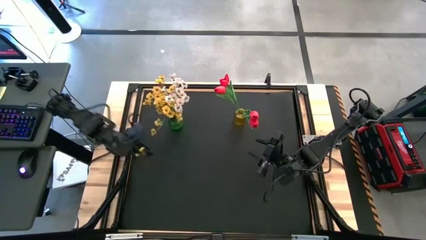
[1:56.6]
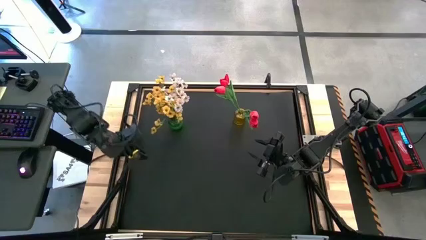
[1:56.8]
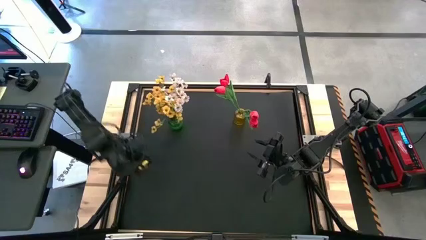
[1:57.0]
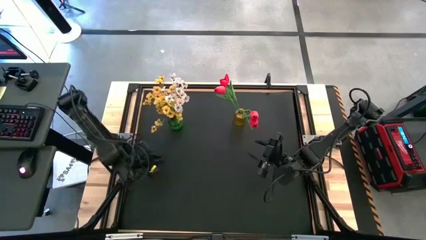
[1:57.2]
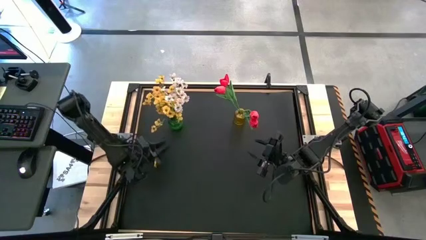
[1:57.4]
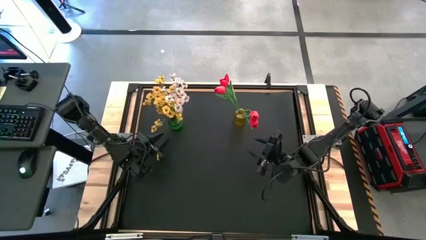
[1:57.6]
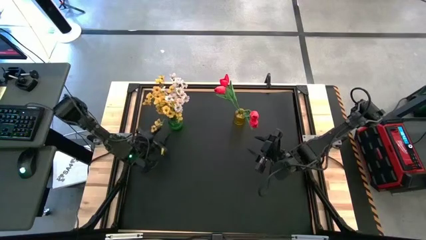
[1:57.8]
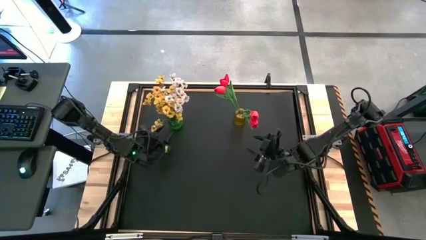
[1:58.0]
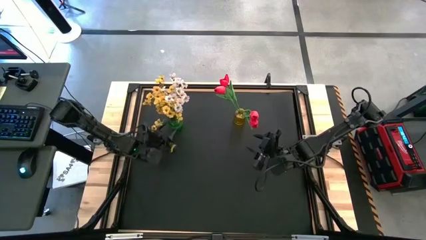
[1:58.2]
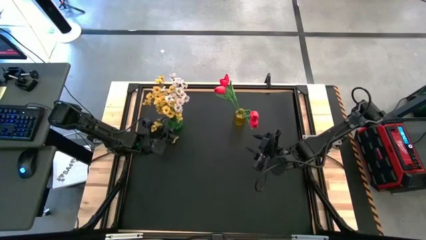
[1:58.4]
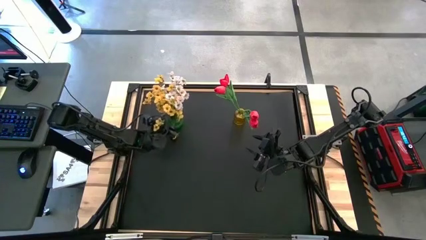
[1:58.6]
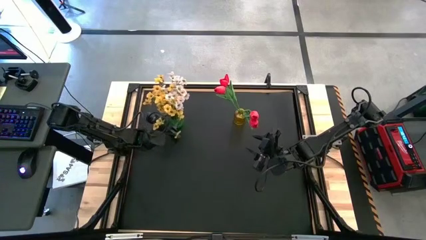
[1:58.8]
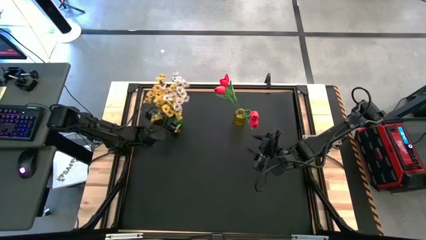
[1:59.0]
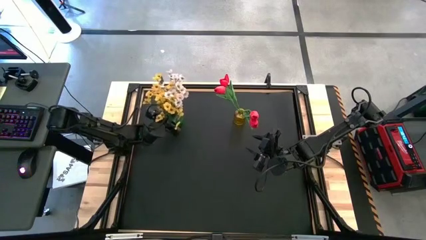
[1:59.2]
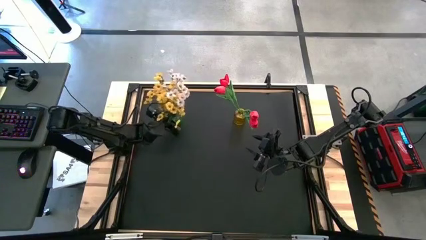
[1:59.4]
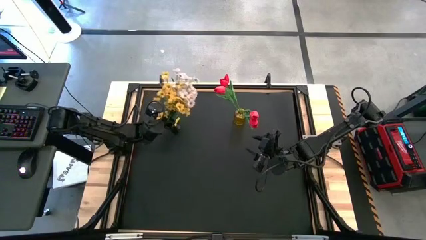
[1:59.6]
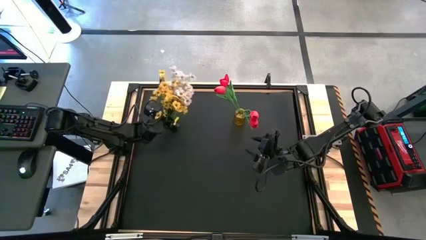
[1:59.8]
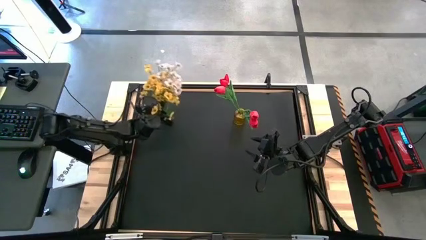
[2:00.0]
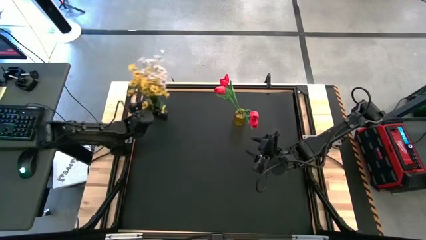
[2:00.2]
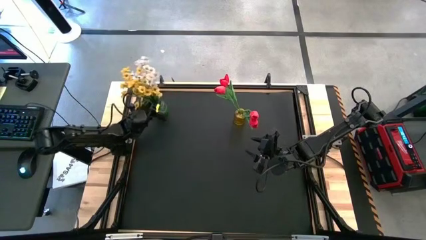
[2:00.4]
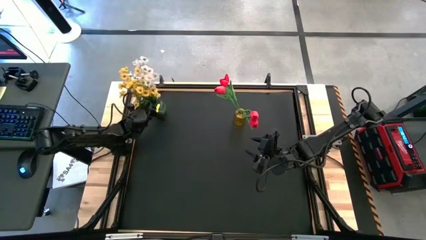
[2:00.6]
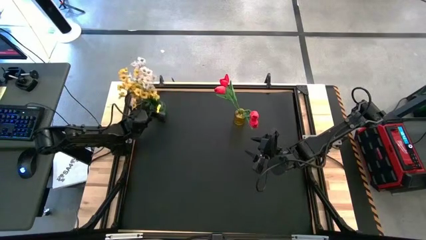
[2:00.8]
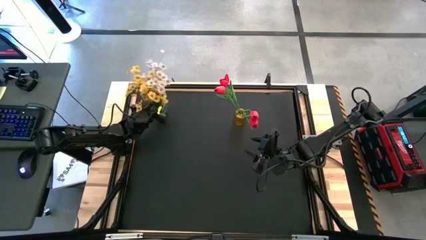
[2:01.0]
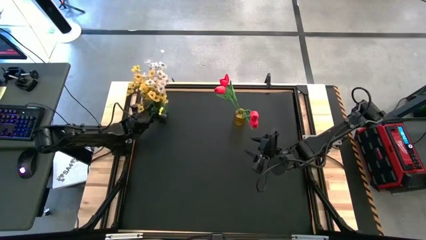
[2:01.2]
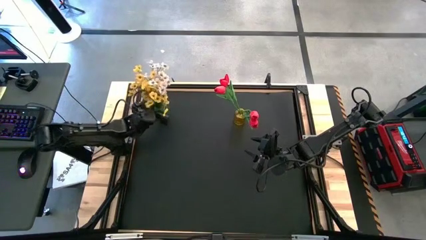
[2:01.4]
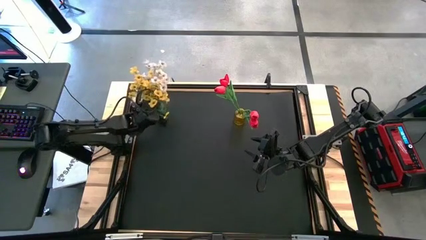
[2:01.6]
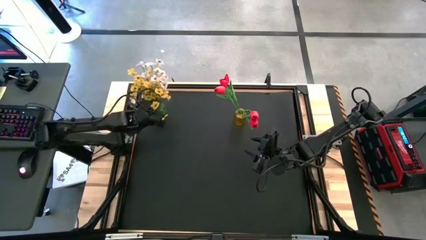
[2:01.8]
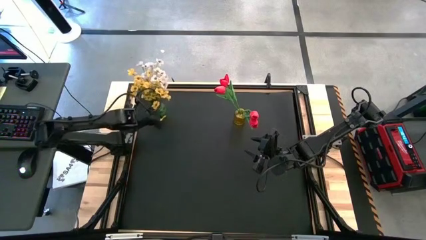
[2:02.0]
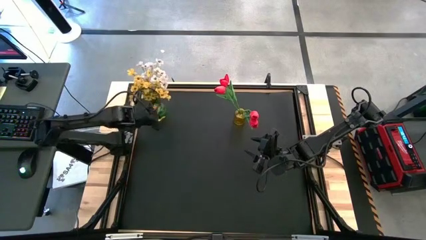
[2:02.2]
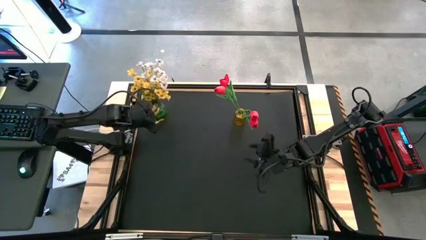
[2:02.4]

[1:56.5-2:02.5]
Task: Sort flowers into vase by color
Move the green vase to the left

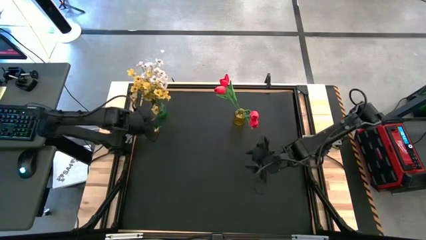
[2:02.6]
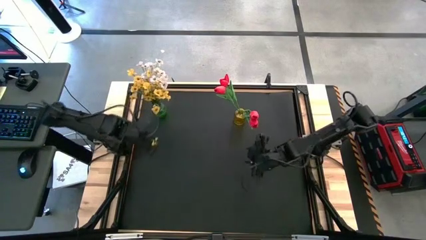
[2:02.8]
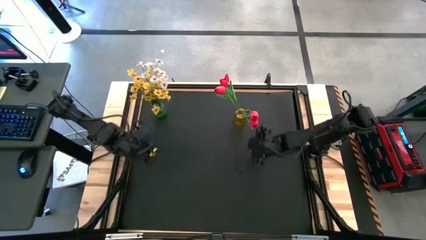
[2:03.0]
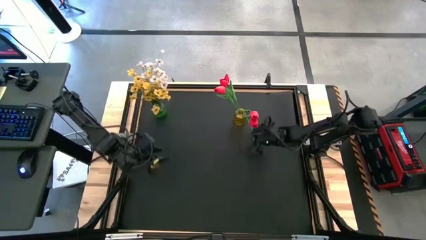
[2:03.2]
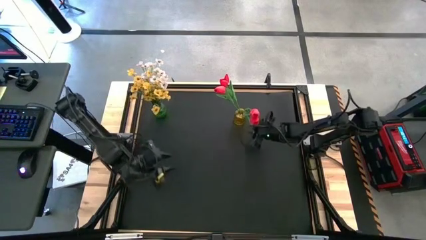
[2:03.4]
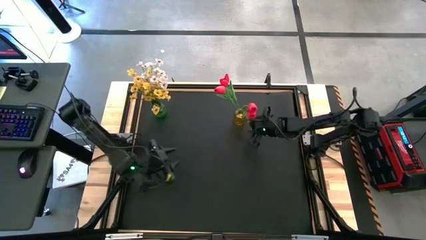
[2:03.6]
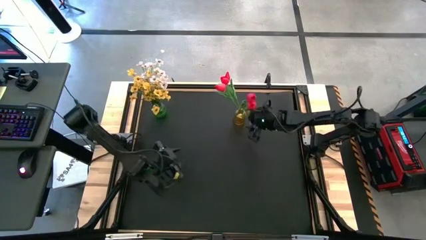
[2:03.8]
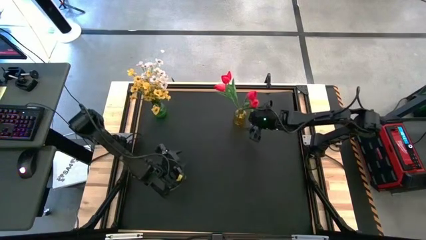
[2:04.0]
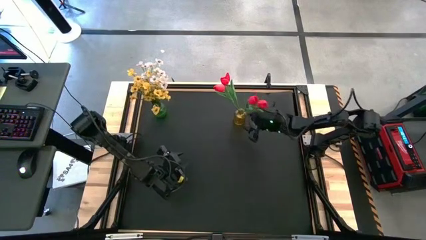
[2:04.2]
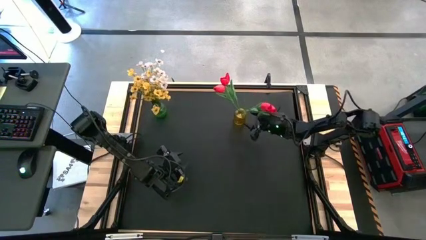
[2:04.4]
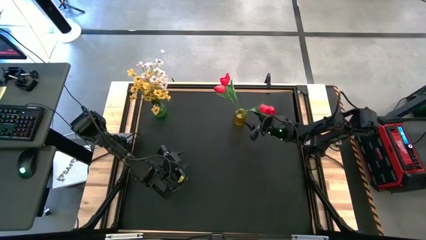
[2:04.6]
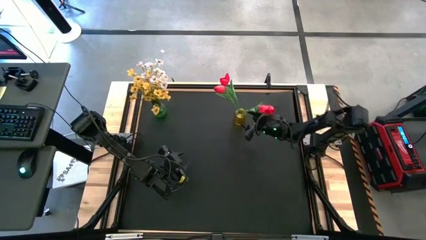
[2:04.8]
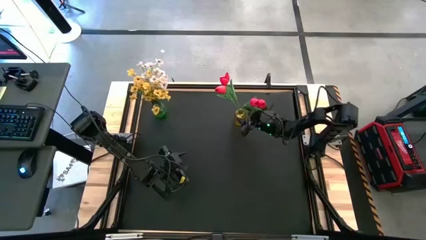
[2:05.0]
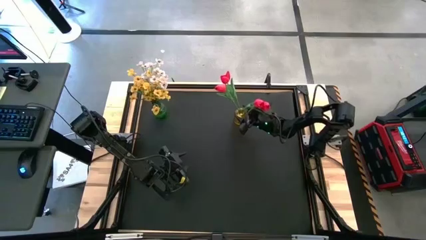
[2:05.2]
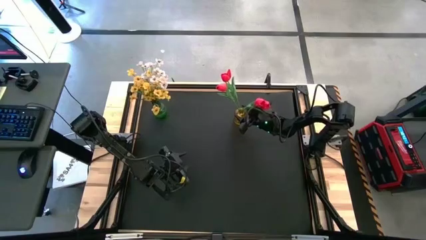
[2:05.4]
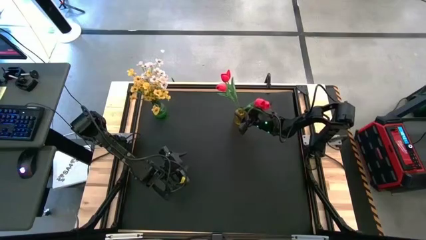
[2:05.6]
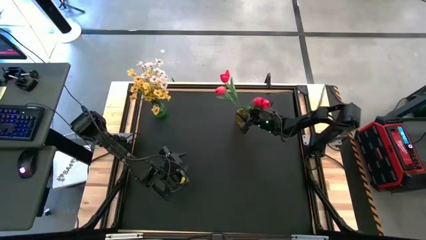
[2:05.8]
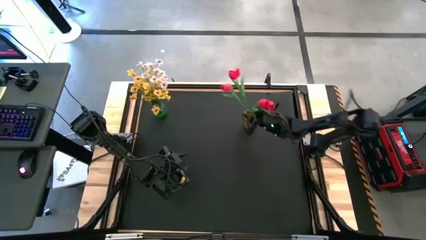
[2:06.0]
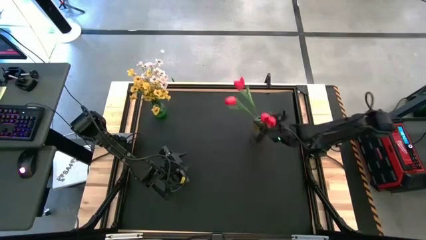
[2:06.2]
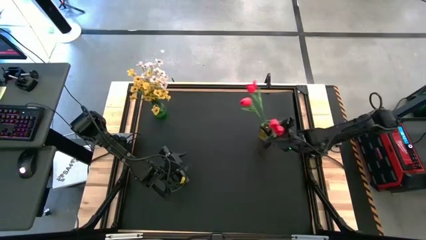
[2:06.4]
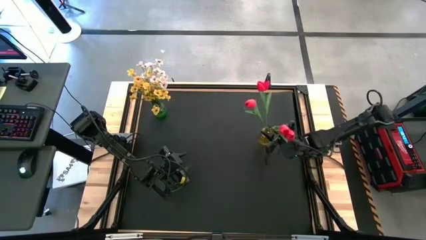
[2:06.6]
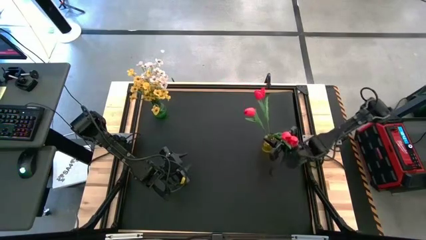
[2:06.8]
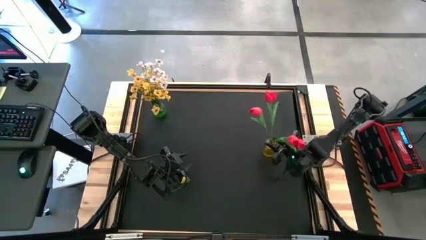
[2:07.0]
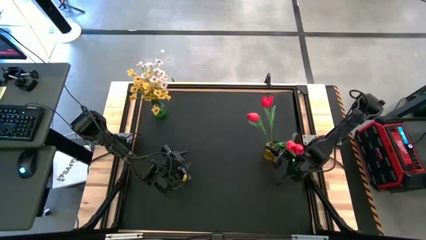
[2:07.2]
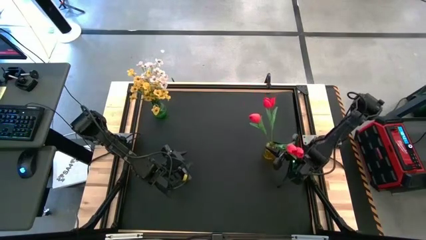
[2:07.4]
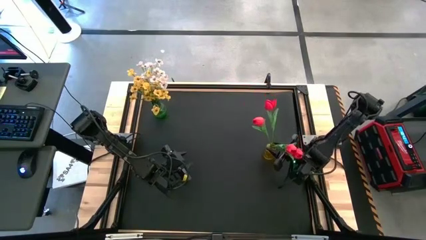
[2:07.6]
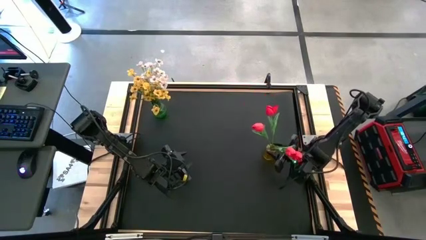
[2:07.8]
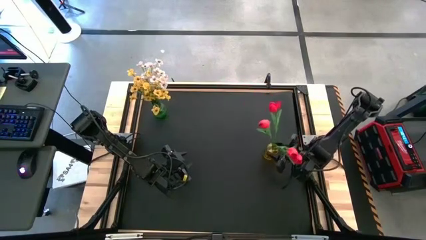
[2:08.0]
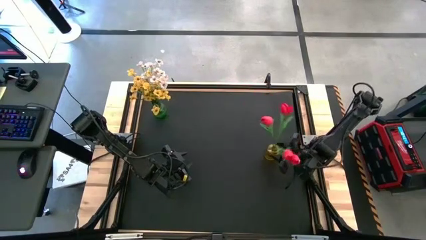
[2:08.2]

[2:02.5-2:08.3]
Move the yellow vase to the center right of the table

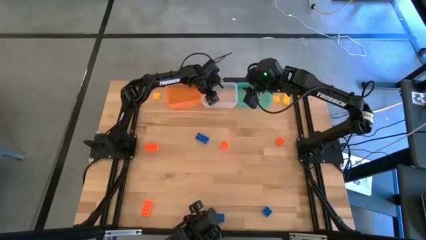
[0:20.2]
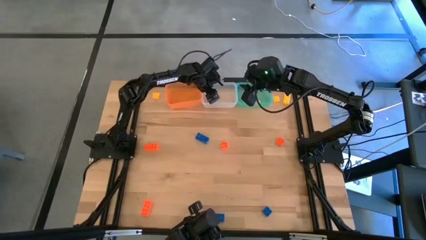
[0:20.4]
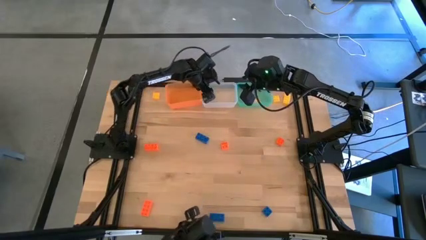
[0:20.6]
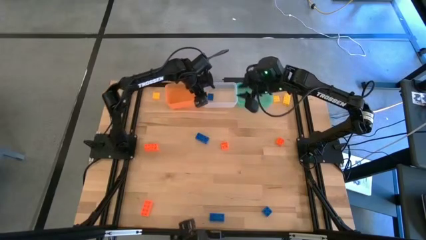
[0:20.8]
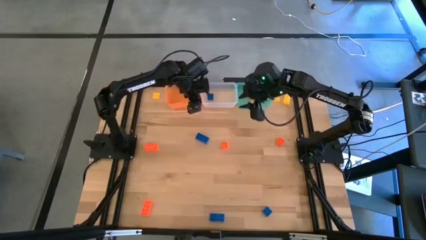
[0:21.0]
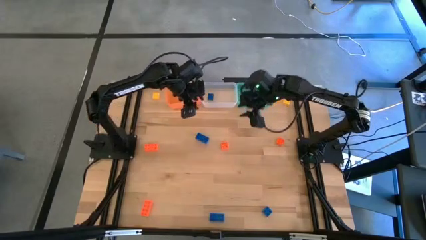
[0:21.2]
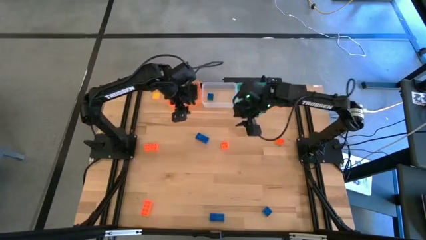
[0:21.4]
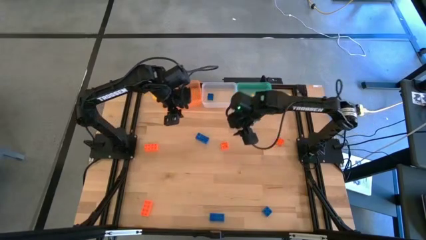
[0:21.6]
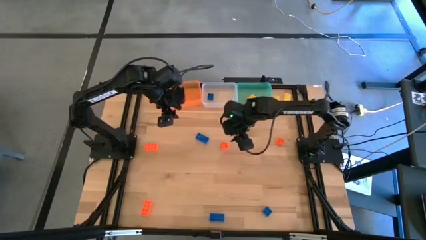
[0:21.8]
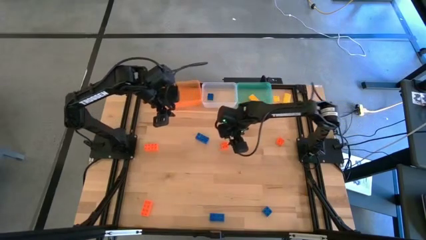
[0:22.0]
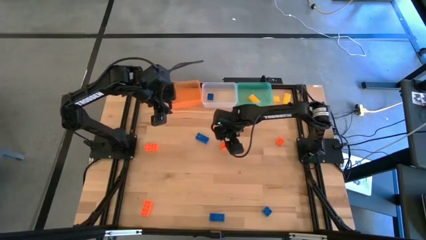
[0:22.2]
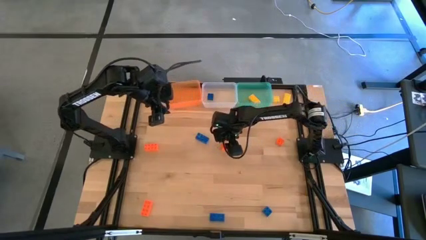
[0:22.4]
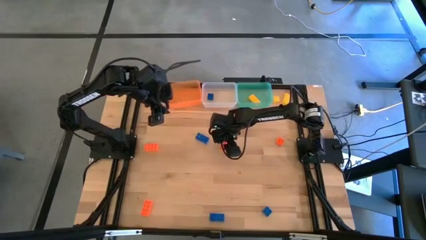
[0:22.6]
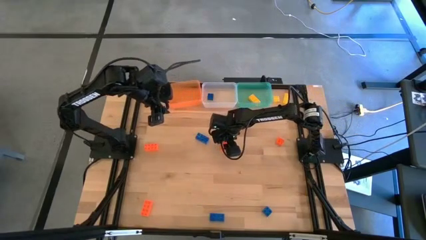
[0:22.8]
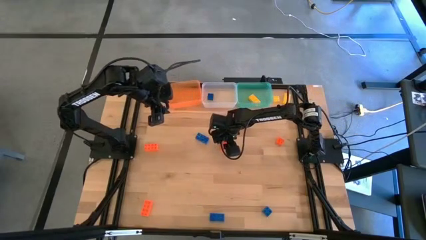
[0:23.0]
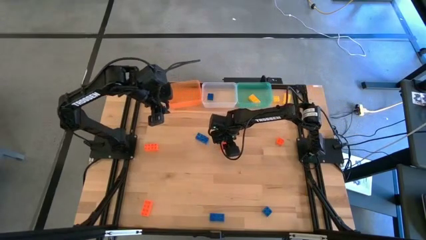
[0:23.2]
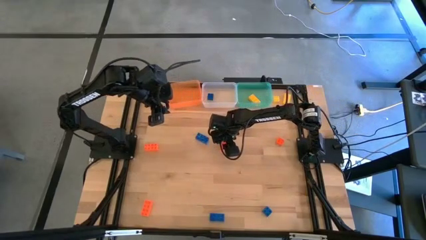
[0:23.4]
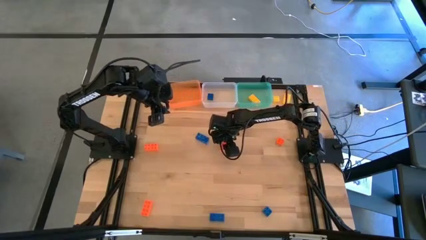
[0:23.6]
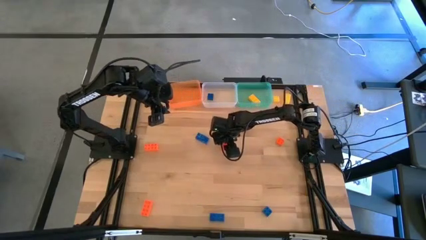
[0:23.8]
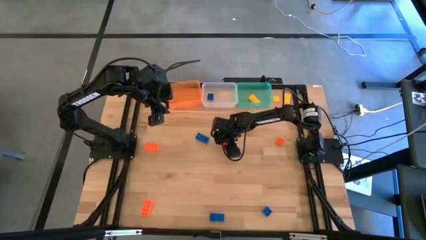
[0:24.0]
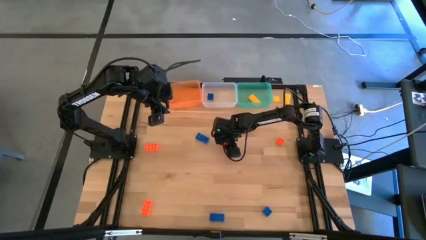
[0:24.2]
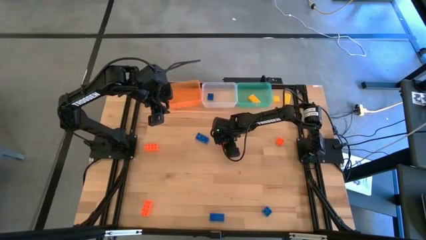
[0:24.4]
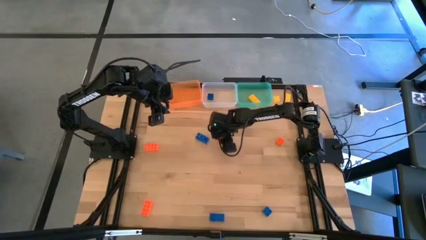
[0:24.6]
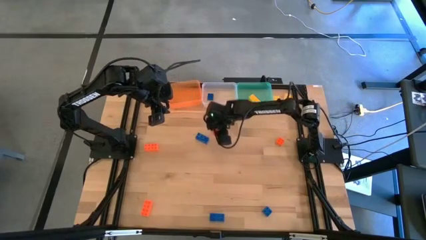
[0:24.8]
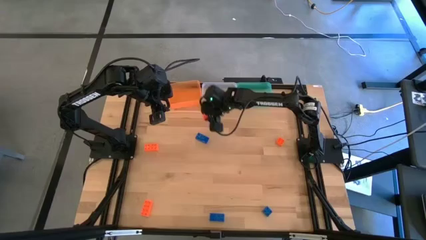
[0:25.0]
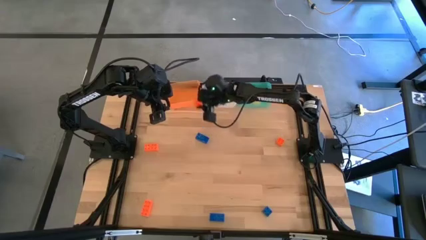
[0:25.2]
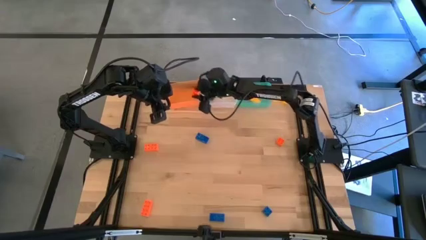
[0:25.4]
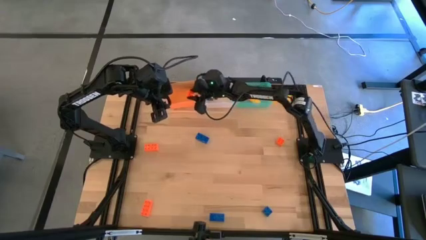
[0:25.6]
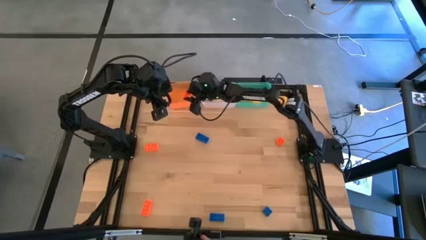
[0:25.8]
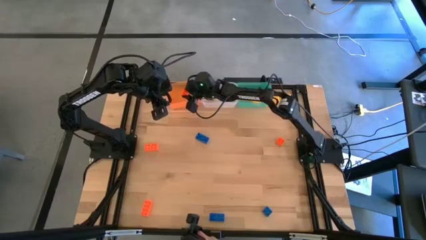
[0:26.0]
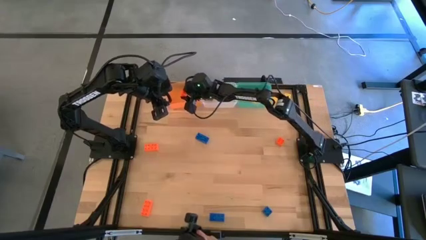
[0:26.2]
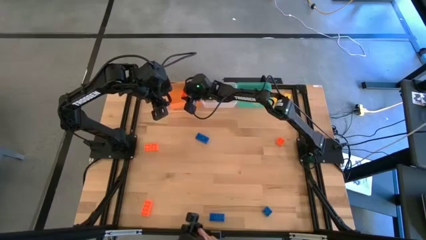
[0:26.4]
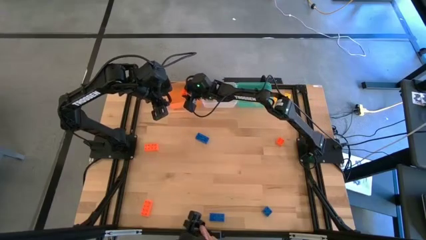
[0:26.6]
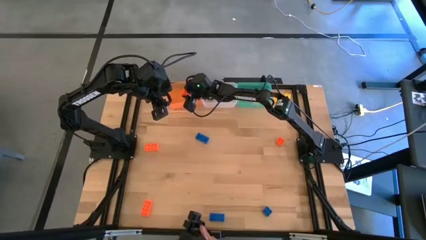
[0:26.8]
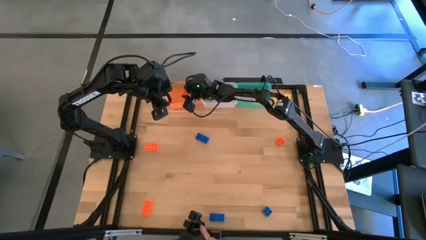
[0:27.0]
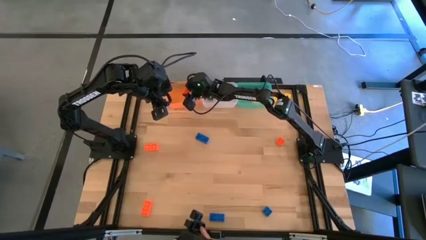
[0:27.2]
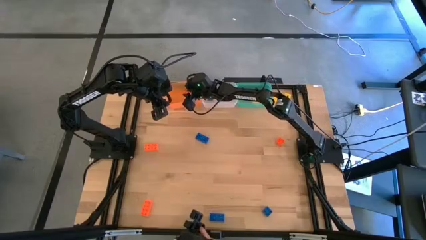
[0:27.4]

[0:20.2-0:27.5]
Task: Sort & place blocks by color
Put the orange game piece into the orange bin
